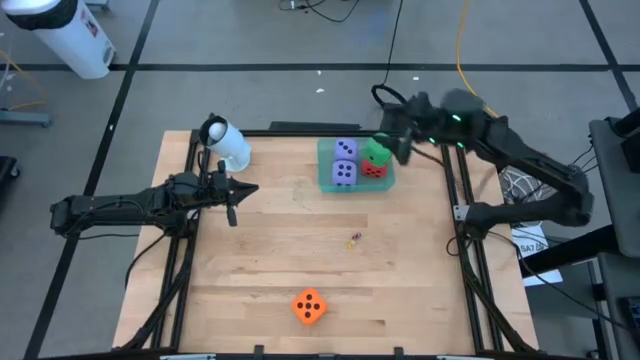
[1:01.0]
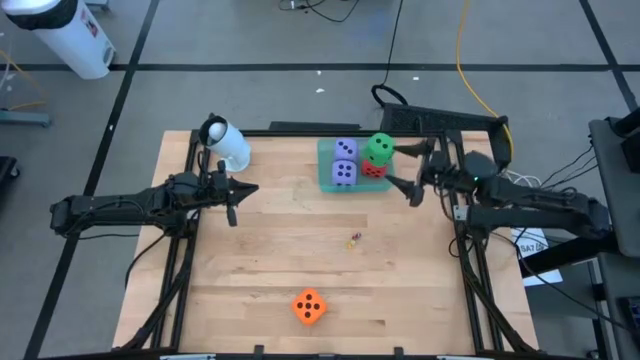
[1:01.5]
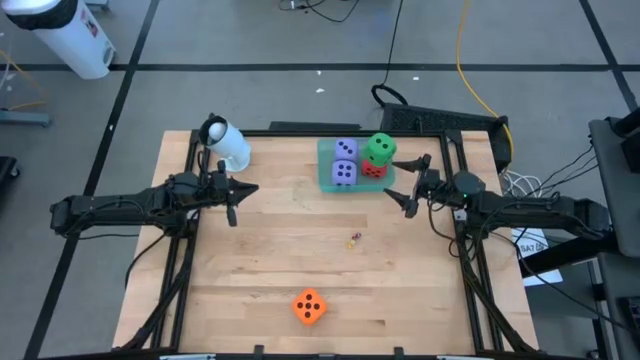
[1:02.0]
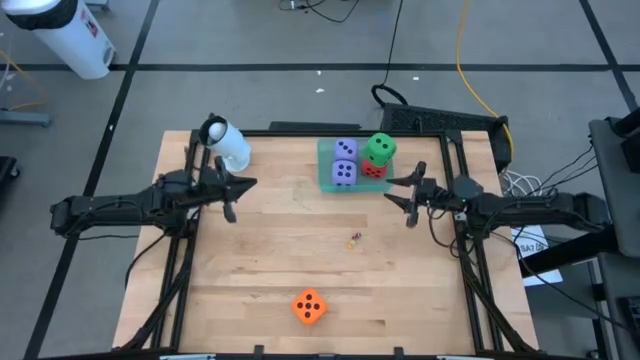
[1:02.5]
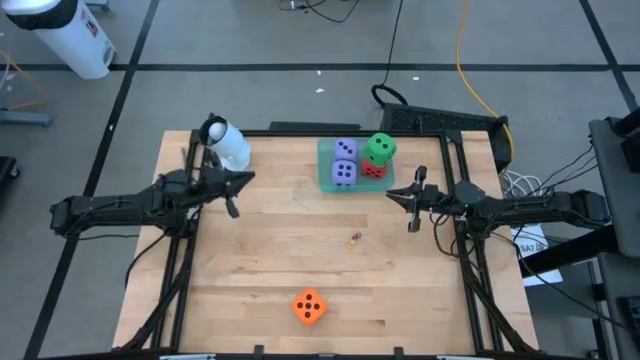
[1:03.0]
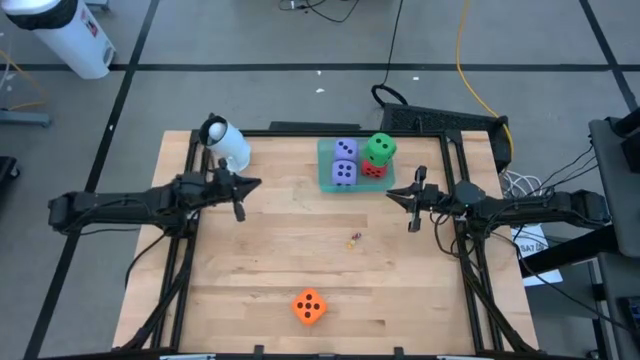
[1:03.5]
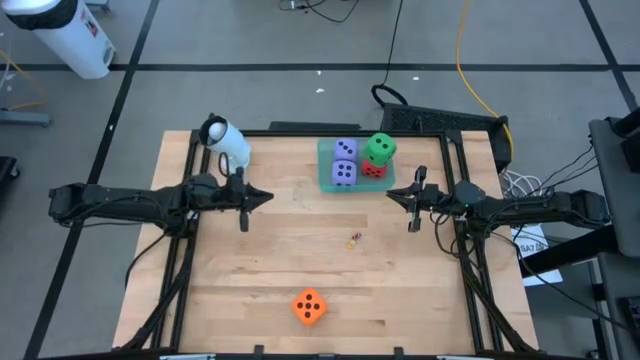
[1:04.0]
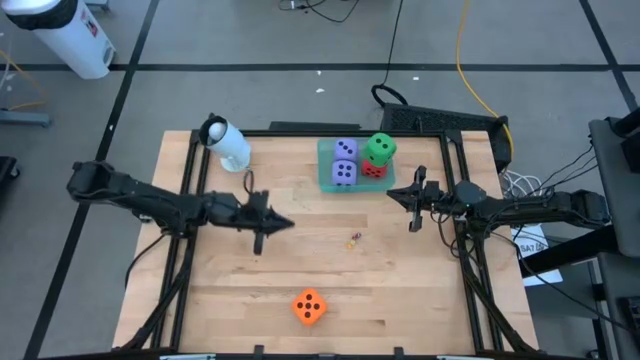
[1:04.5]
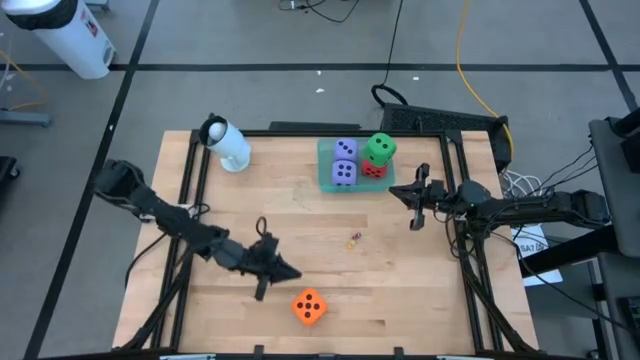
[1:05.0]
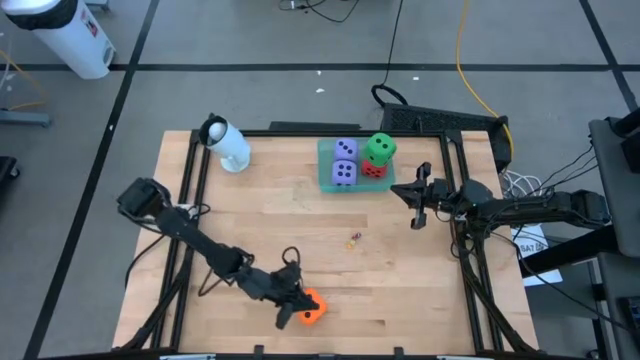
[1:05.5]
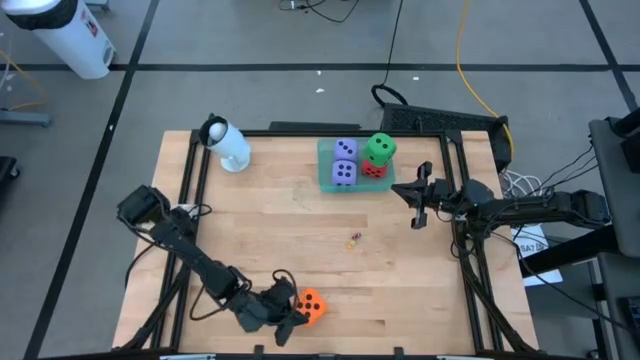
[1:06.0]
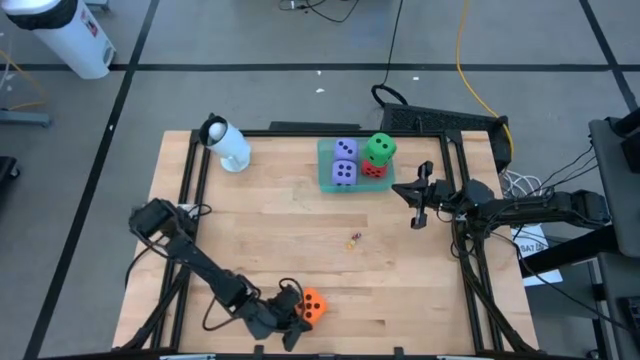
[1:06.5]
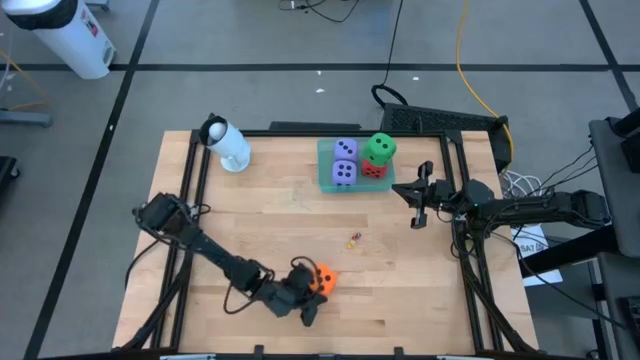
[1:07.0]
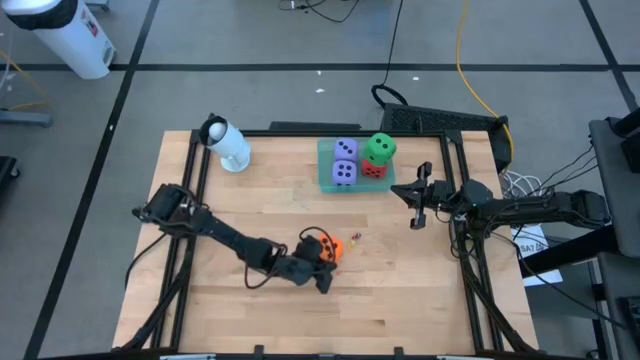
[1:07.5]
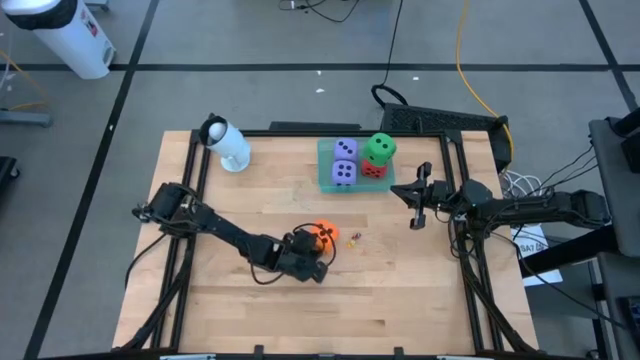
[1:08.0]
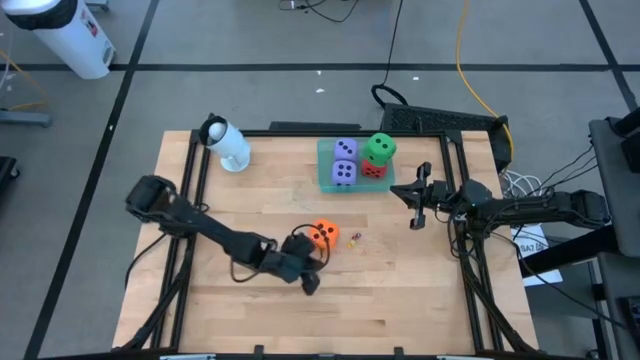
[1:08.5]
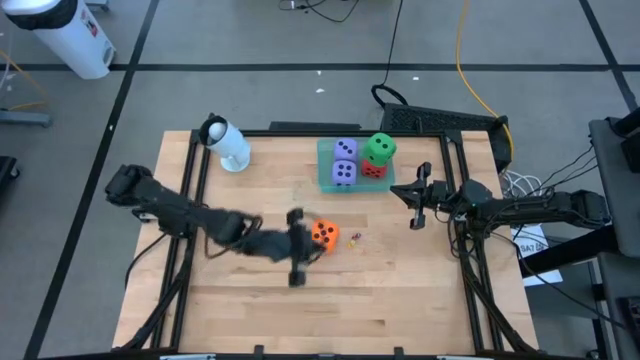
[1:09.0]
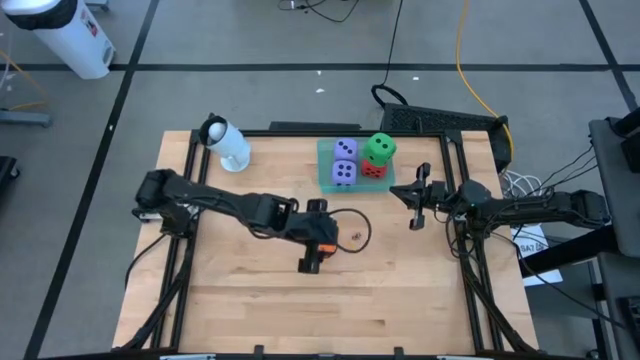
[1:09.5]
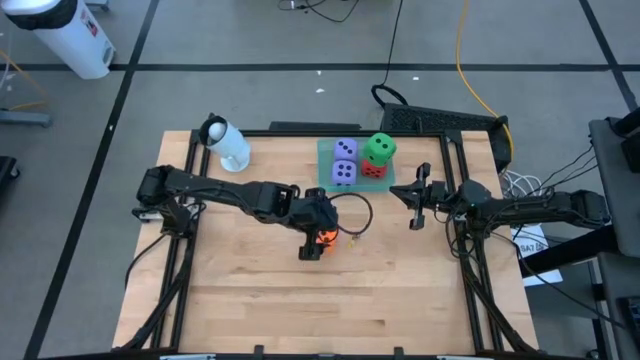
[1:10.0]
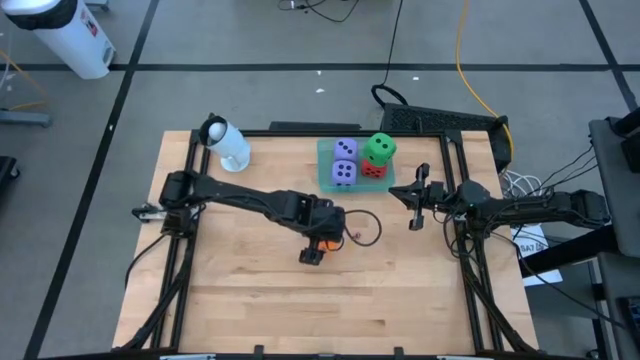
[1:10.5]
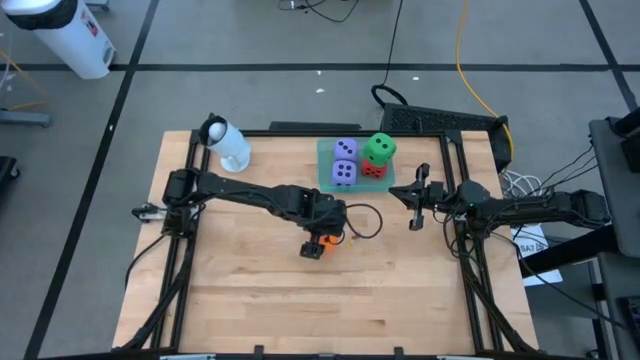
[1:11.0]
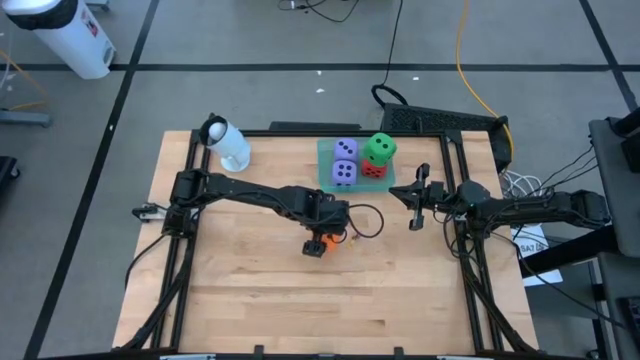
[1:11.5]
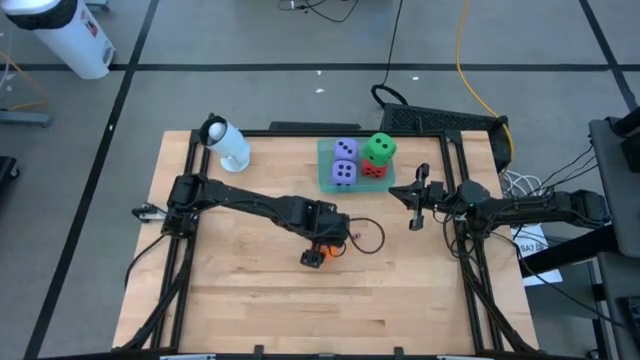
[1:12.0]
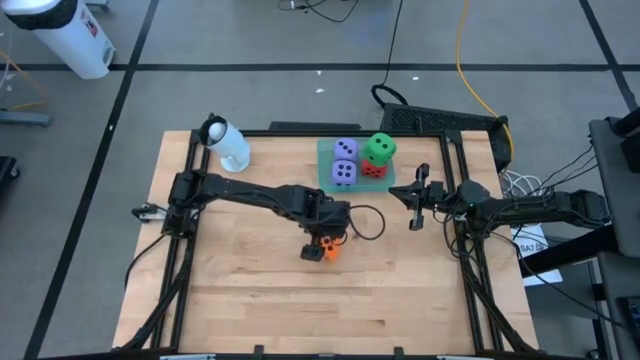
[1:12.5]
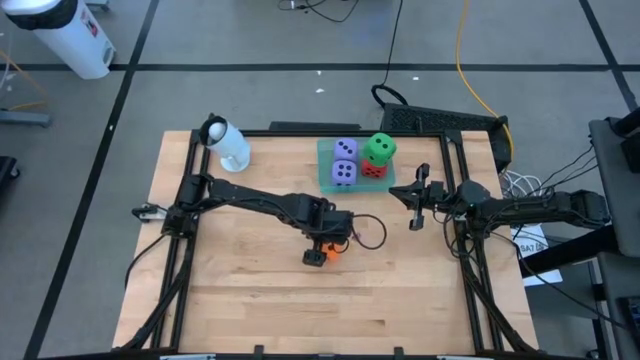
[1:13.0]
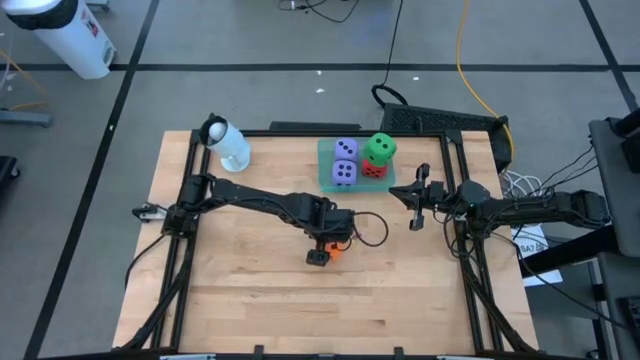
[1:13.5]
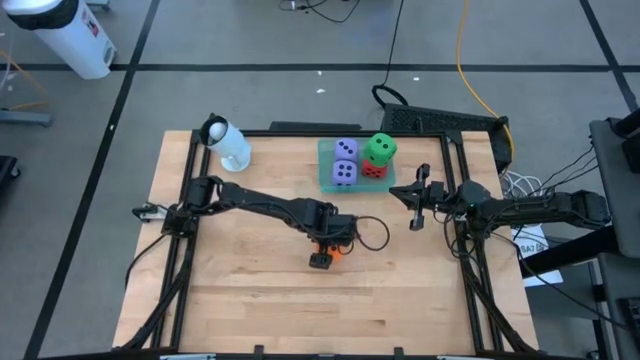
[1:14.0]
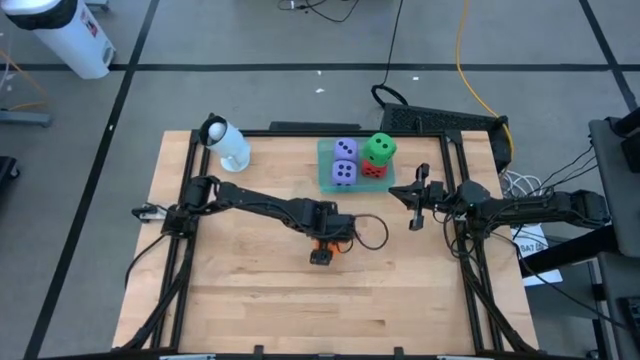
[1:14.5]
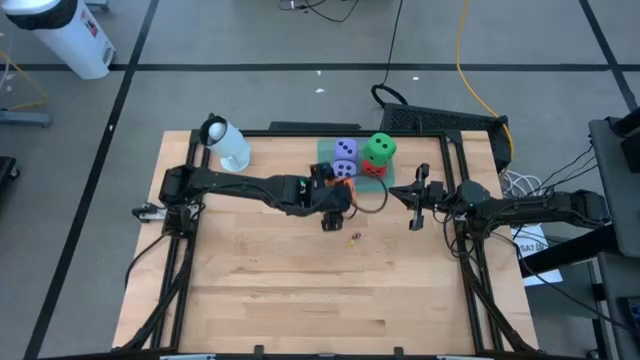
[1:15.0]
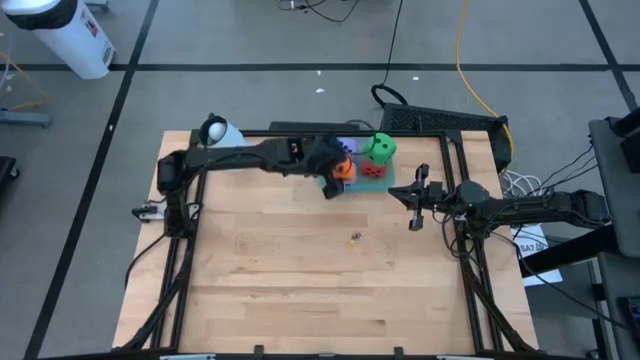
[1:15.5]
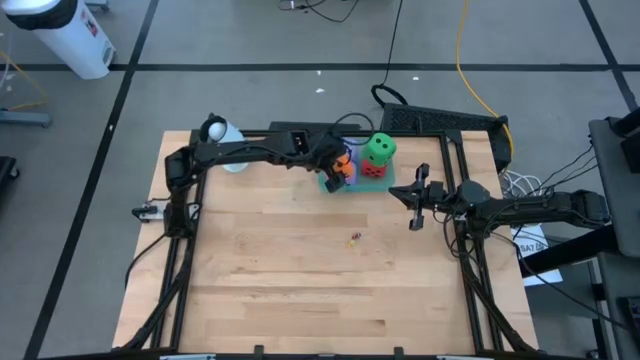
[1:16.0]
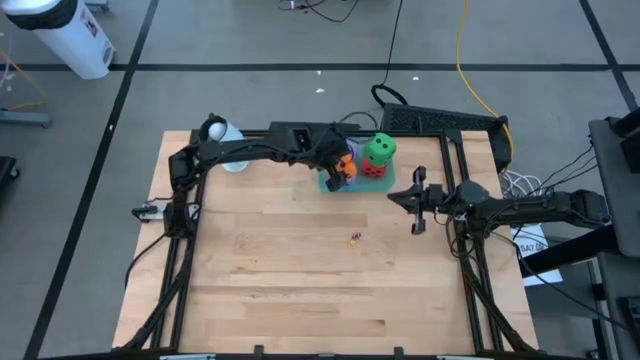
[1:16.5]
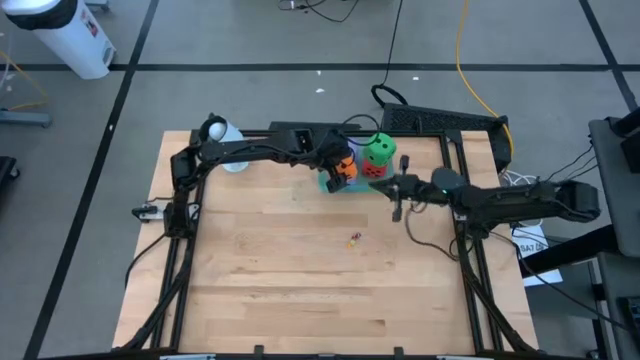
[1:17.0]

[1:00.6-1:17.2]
Task: Pick & Place Dice
Put the large orange die into the bin

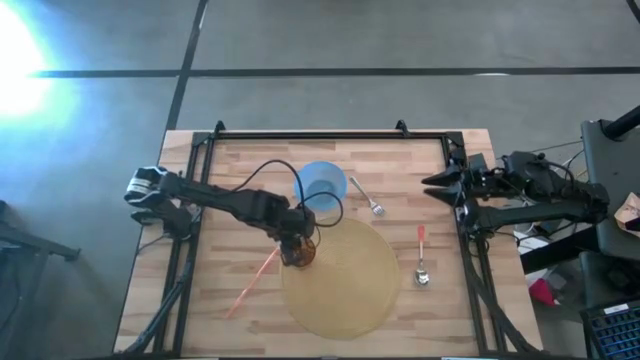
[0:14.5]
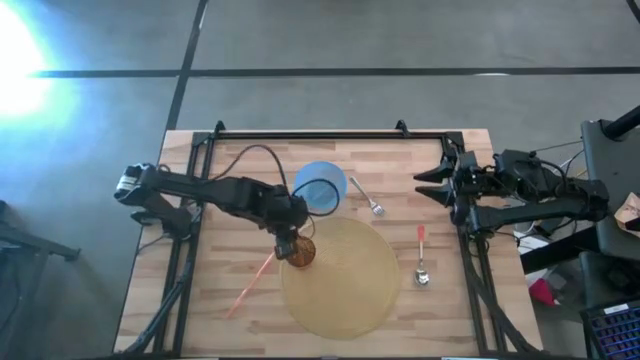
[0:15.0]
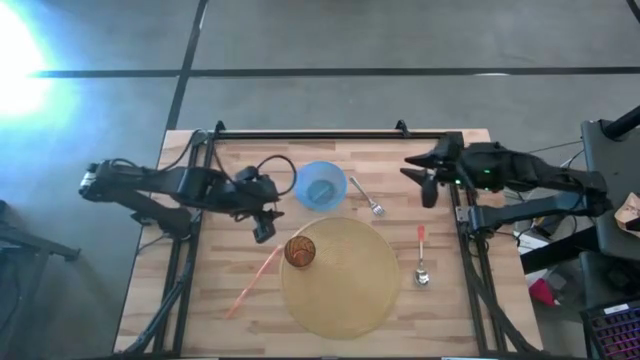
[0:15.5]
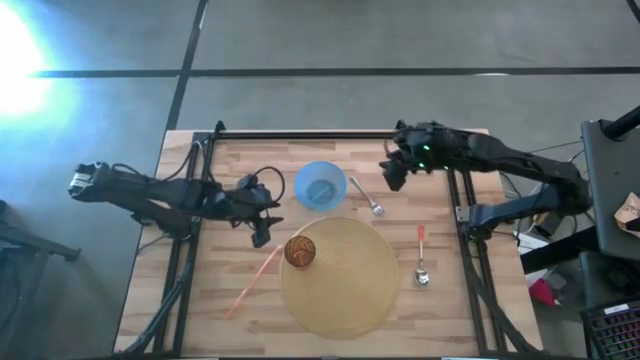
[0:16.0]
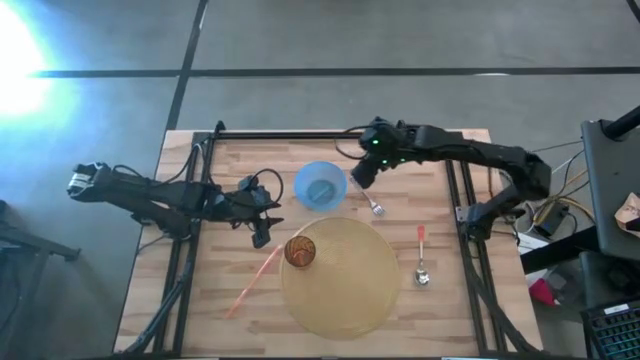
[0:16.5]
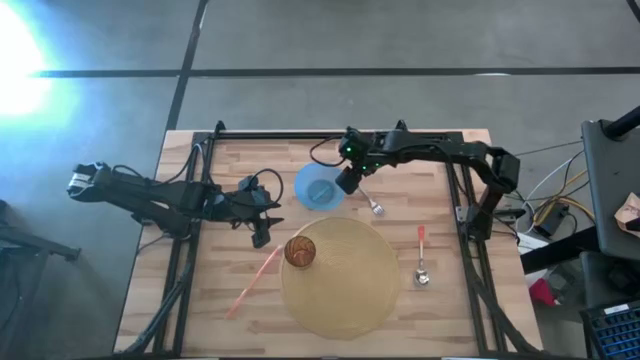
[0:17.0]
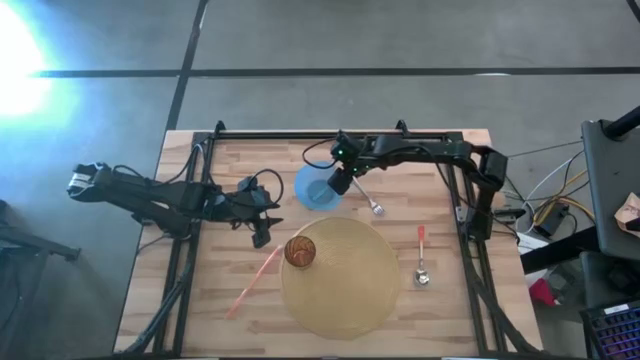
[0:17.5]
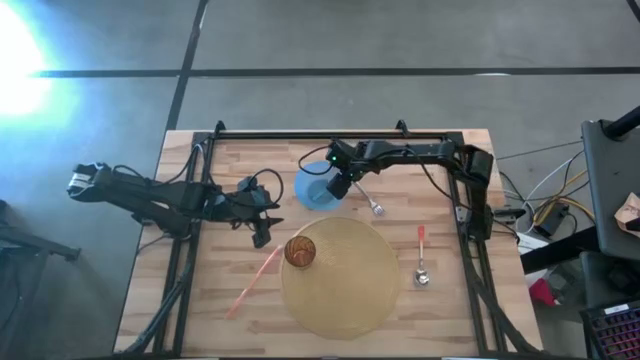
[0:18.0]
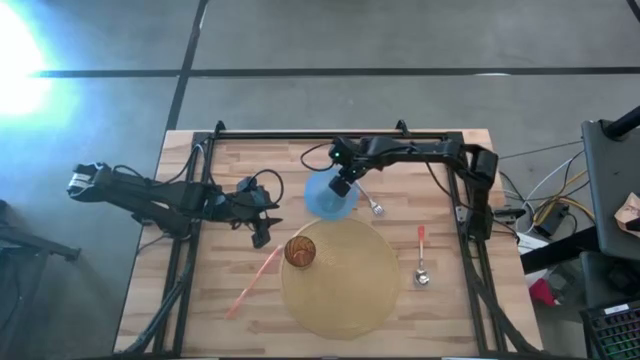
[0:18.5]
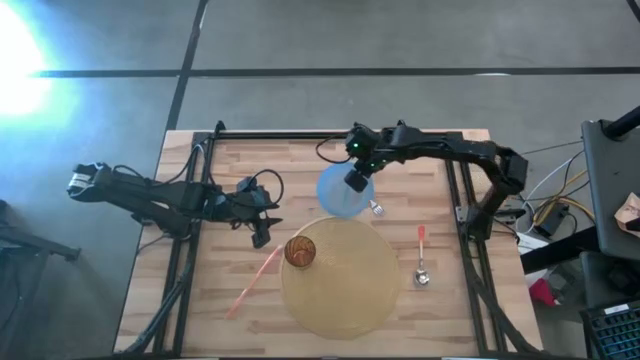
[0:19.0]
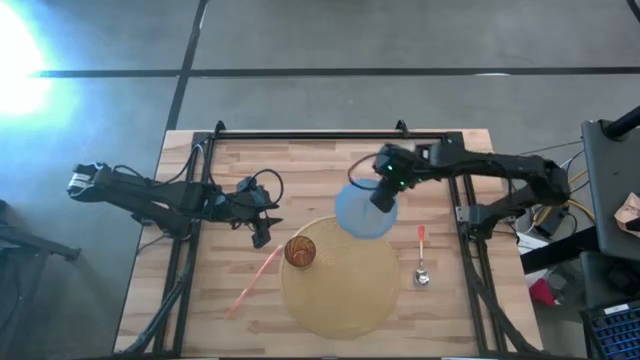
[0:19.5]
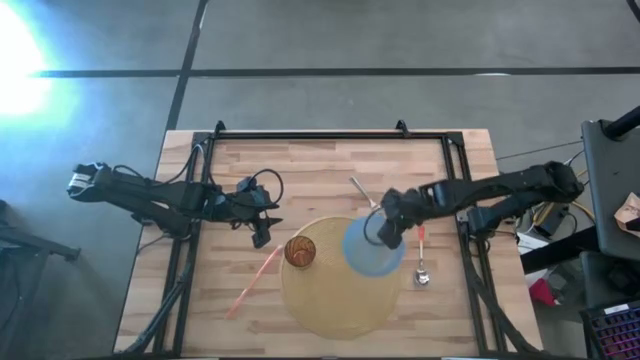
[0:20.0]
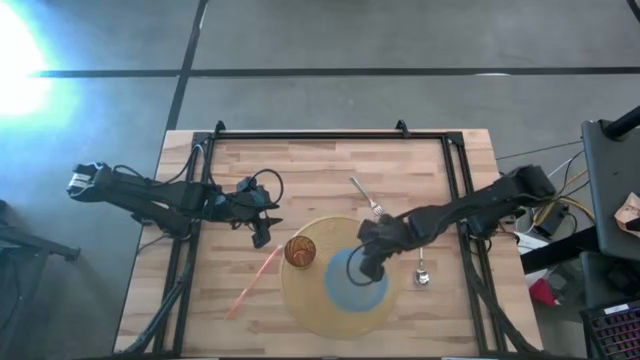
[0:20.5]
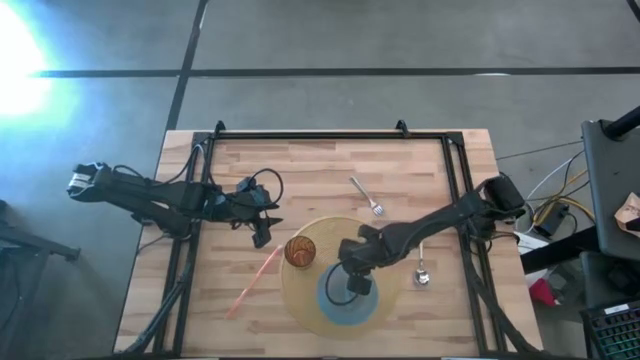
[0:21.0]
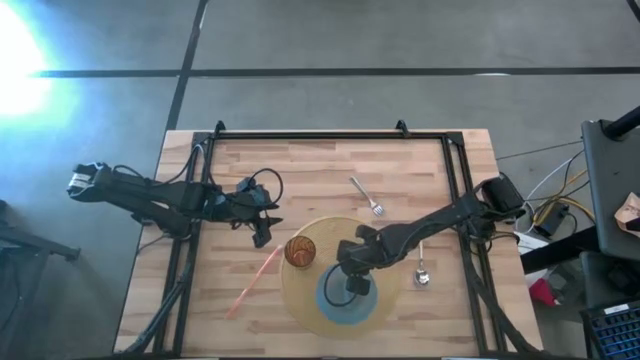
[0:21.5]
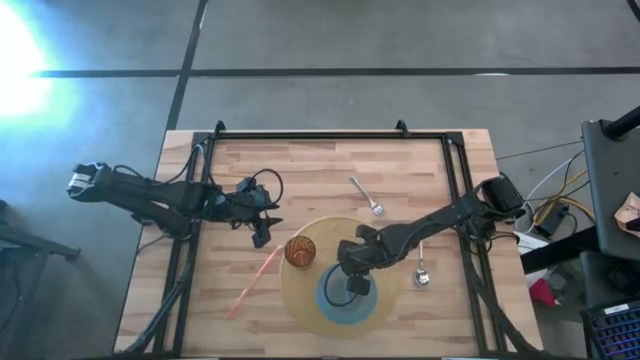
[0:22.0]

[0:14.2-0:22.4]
Task: Pick & Place Utensil
Put the blue bowl on the brown mat to the bottom right of the brown cup
